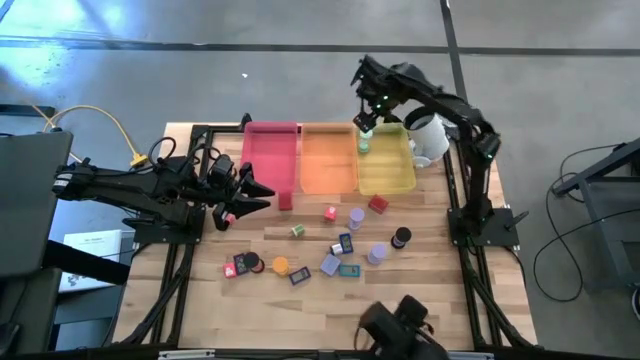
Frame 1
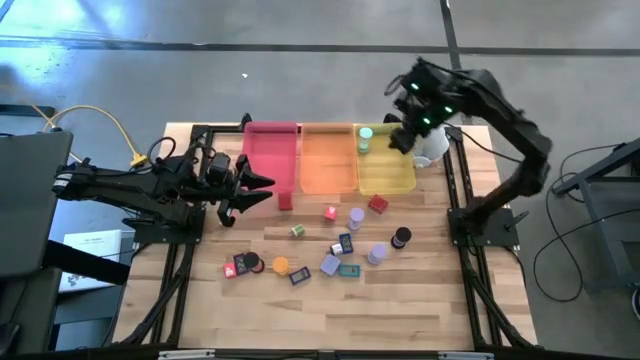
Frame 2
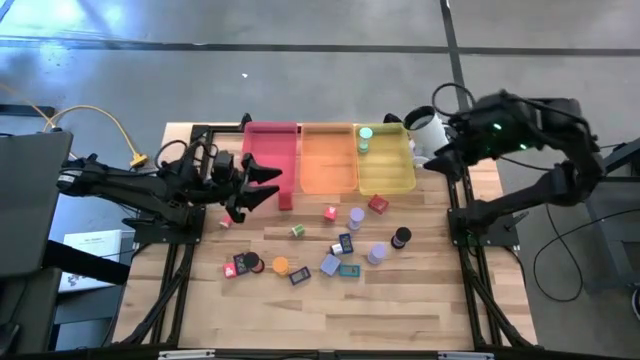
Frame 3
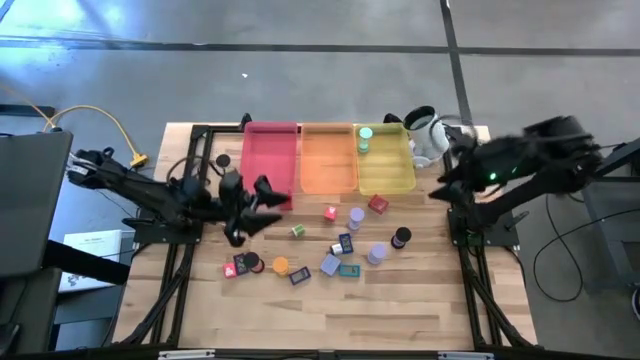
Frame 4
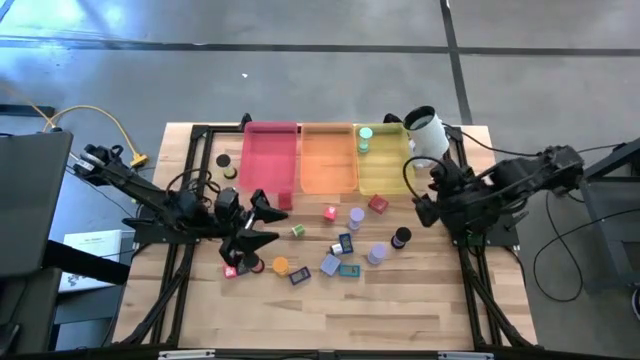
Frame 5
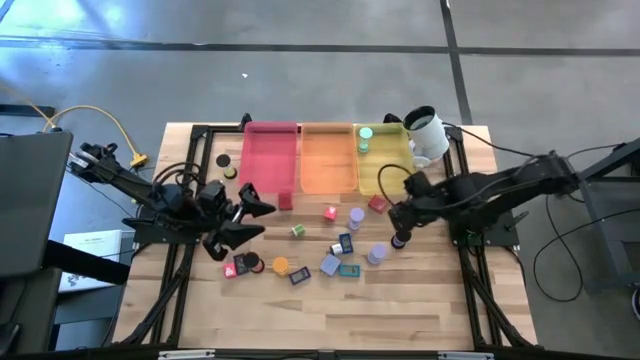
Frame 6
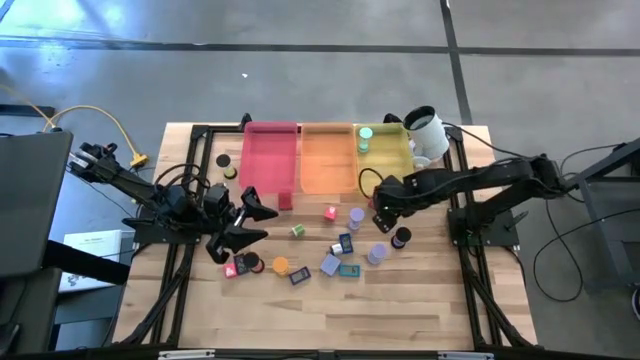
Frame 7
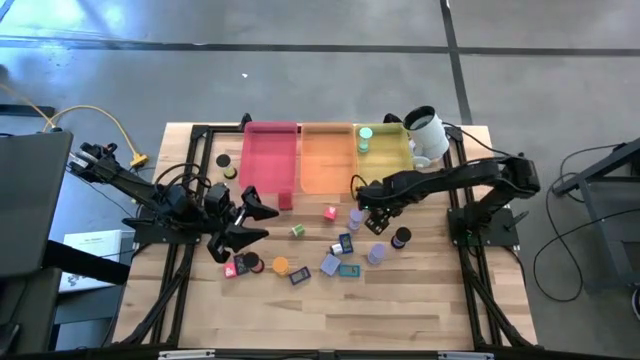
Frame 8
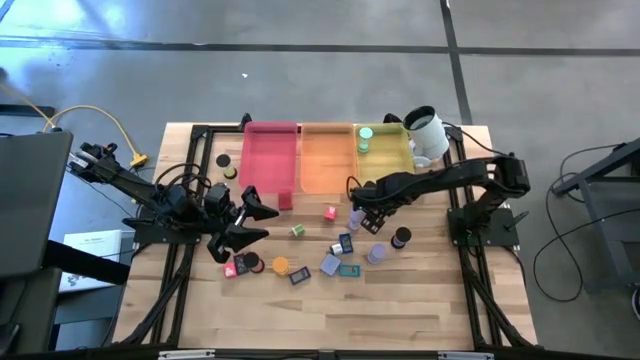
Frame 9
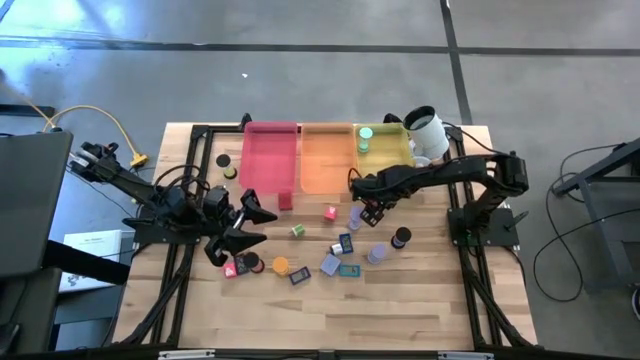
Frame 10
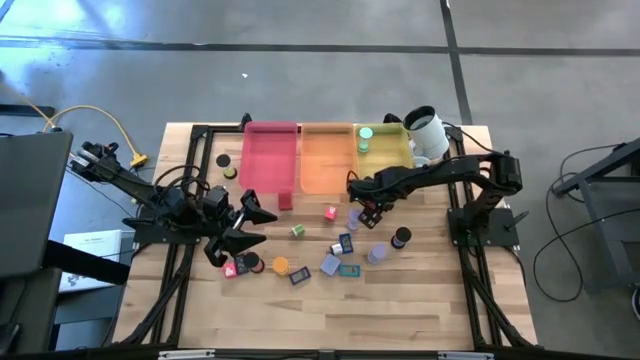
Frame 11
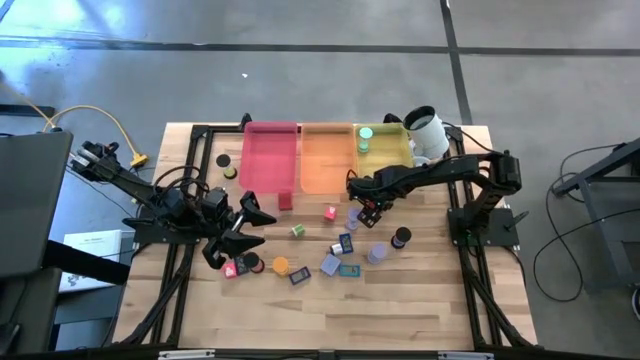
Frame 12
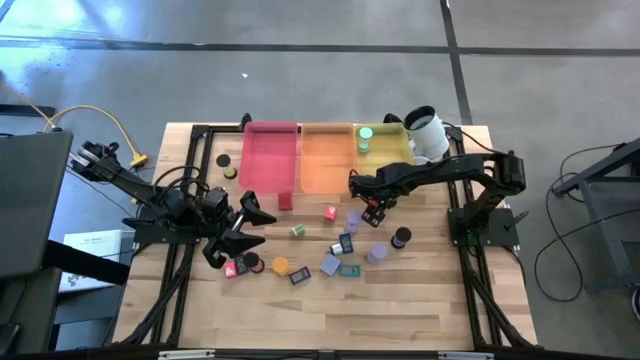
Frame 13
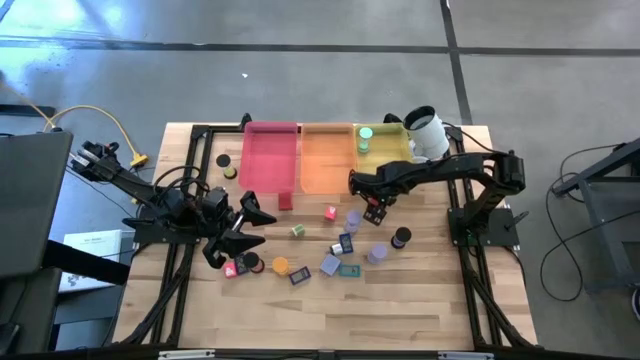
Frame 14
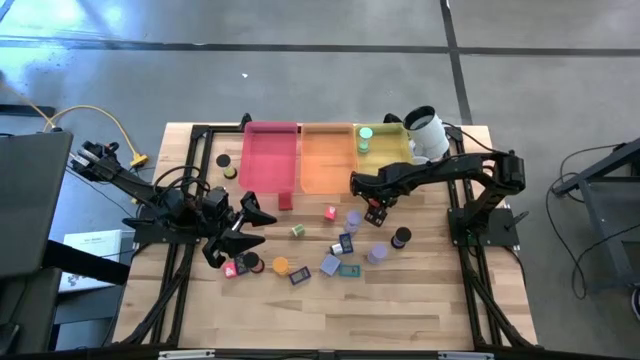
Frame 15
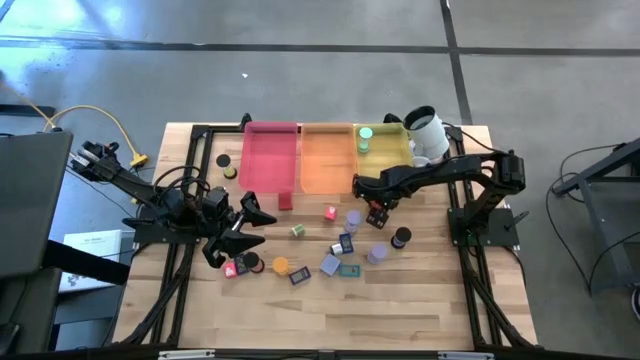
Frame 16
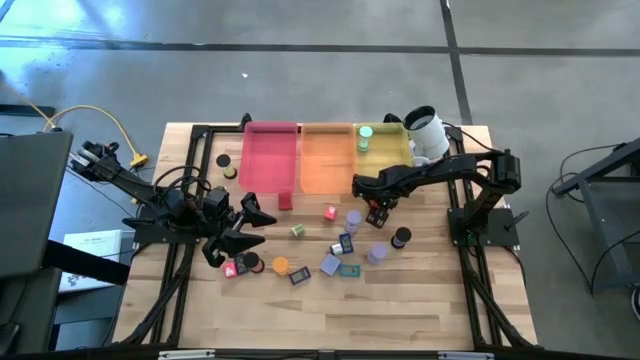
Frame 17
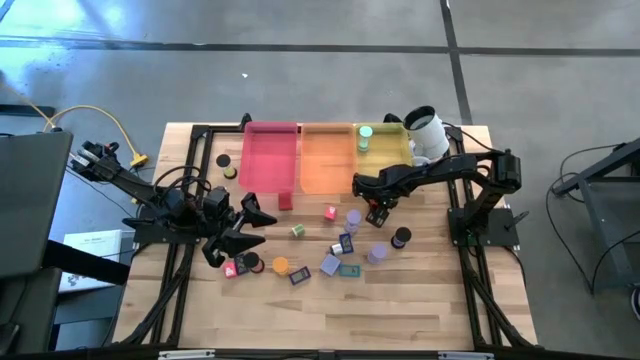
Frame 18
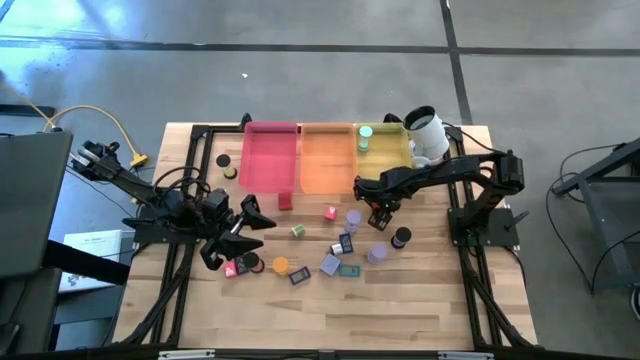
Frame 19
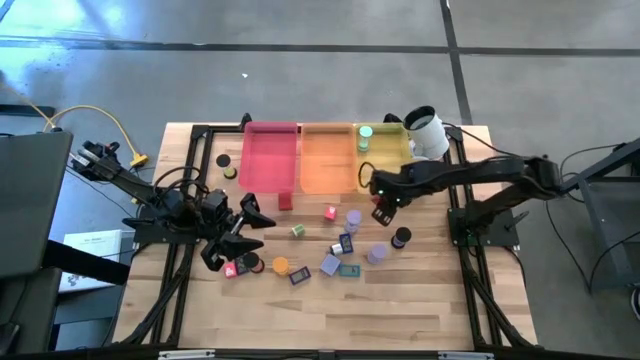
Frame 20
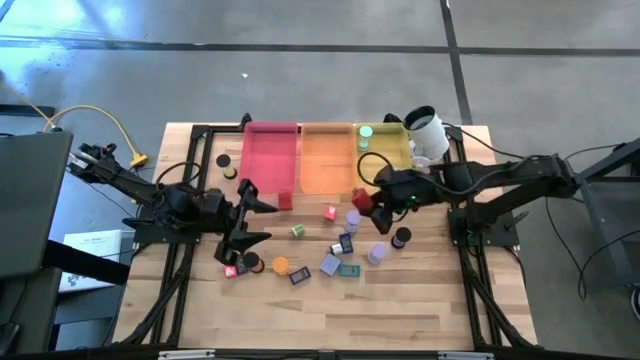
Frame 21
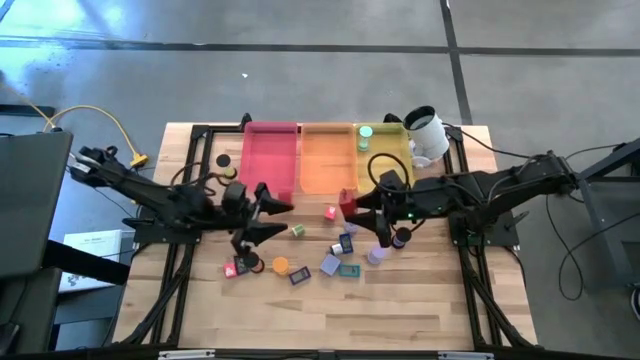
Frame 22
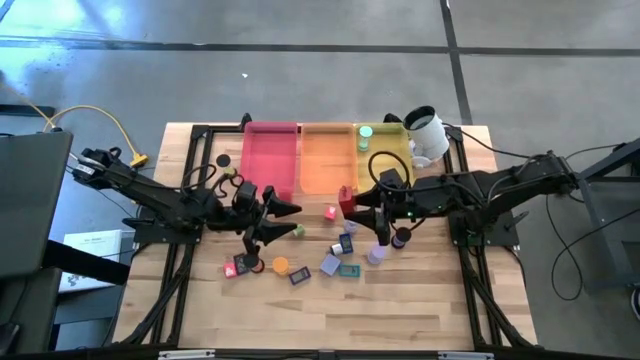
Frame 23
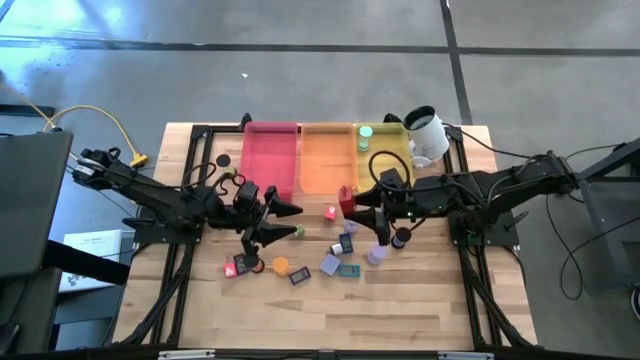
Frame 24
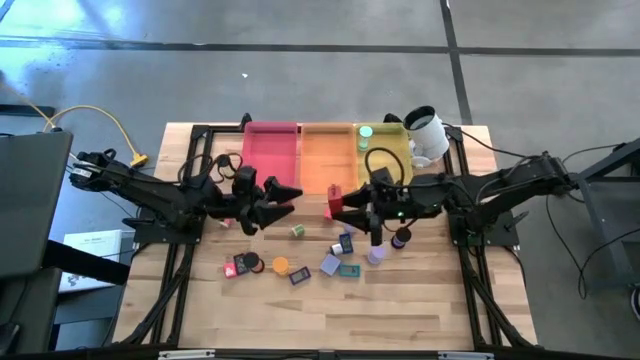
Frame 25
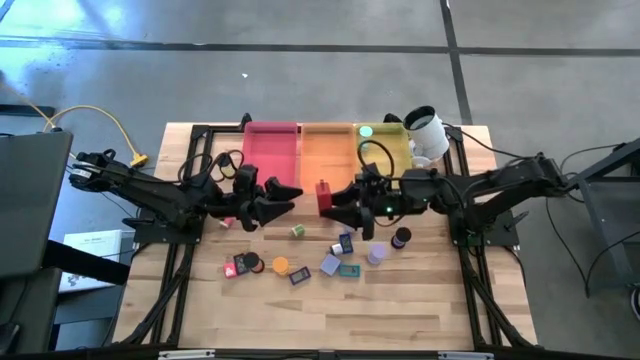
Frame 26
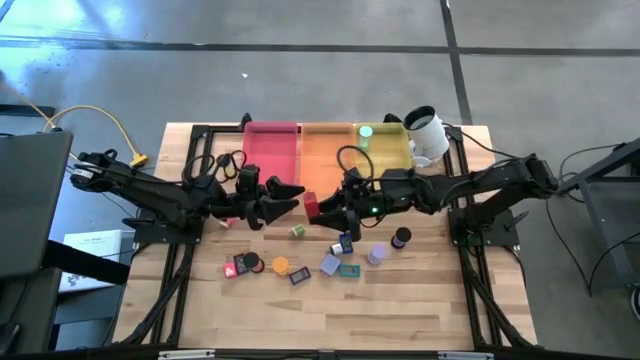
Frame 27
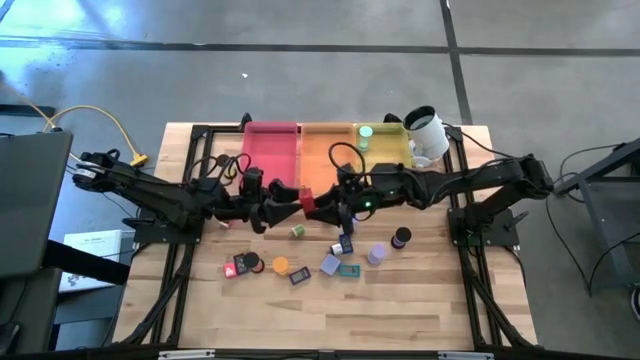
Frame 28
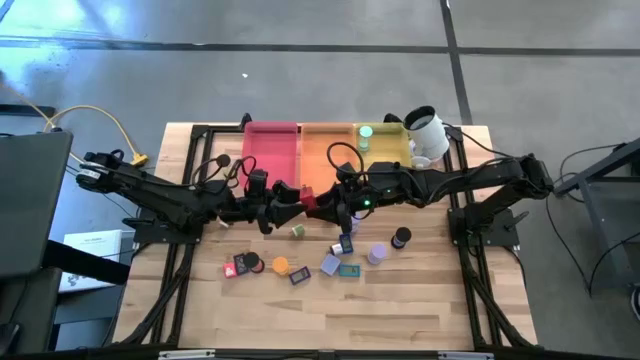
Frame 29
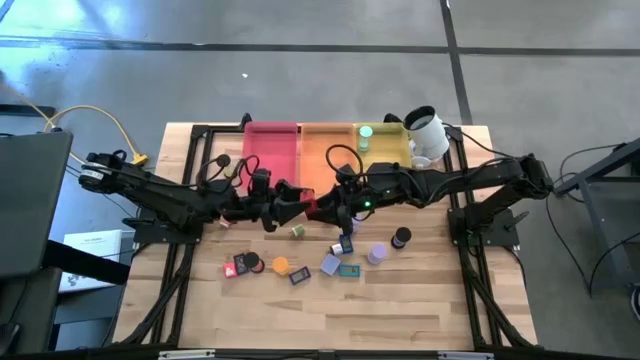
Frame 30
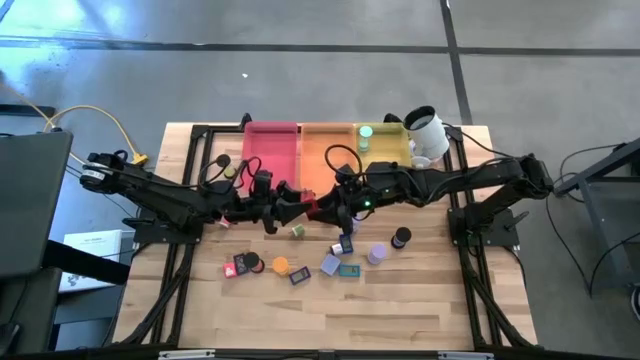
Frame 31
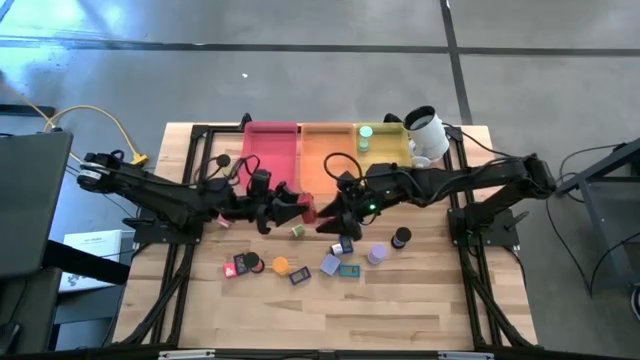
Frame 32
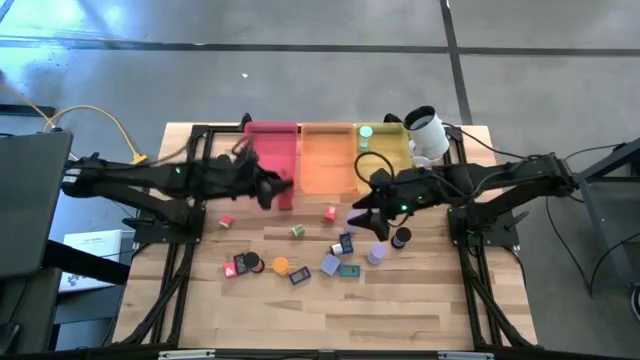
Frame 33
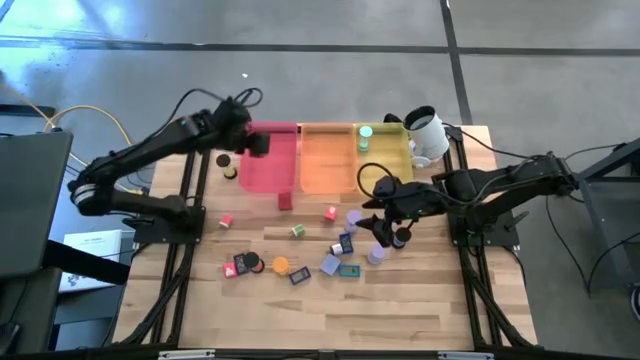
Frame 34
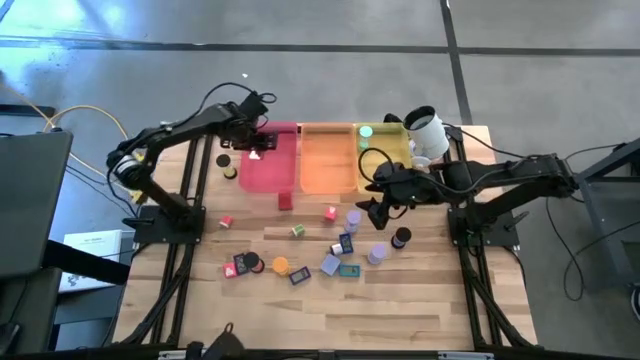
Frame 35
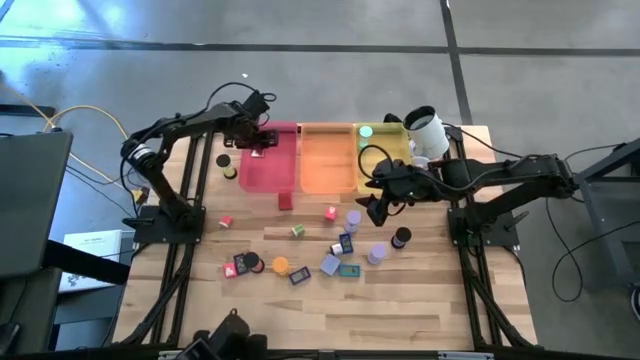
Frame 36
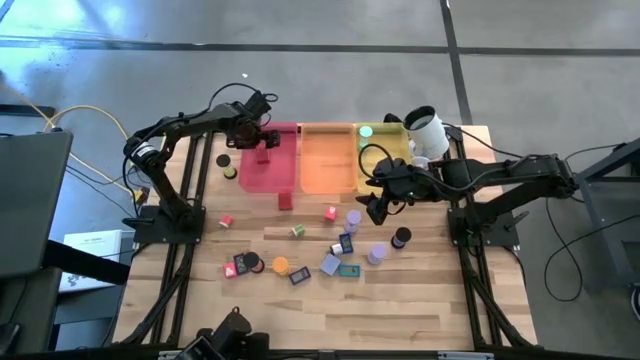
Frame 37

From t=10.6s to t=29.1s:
Task: Pick & Place Office items
Put the right red charger adapter into the pink bin
